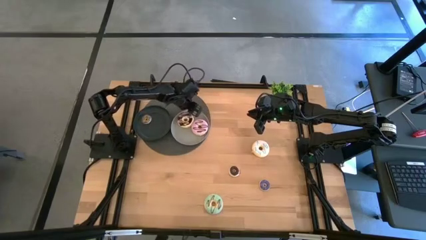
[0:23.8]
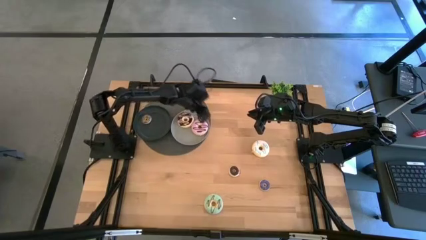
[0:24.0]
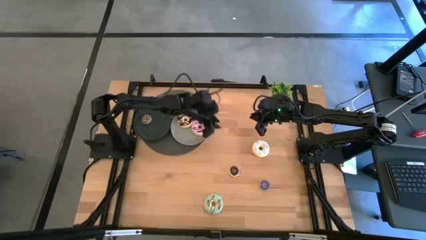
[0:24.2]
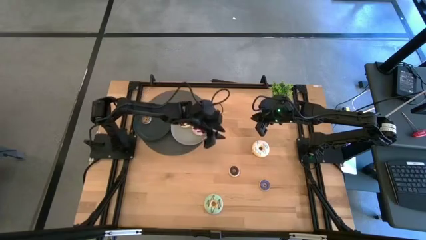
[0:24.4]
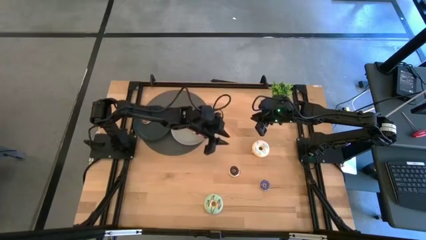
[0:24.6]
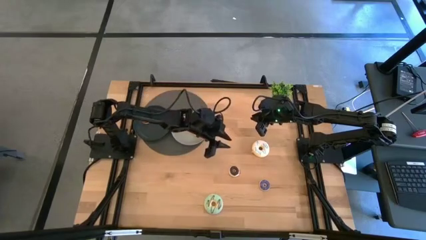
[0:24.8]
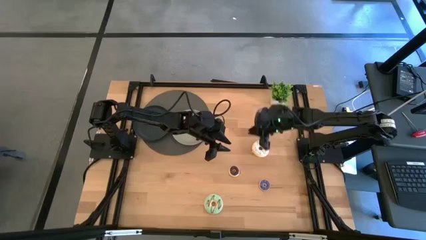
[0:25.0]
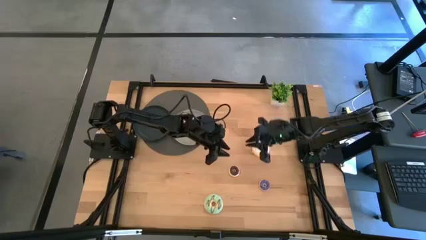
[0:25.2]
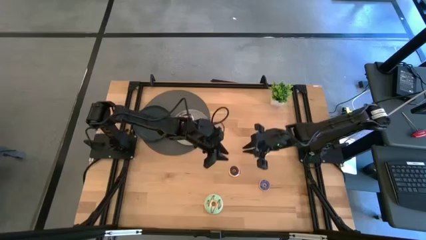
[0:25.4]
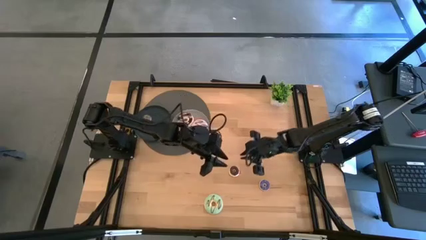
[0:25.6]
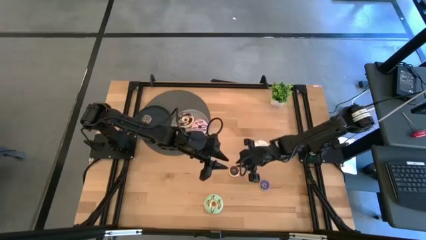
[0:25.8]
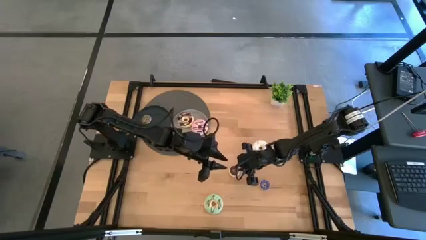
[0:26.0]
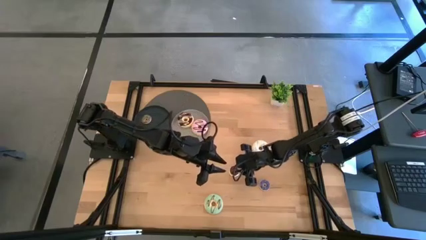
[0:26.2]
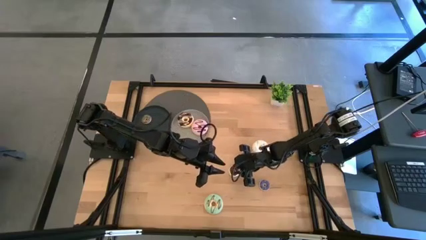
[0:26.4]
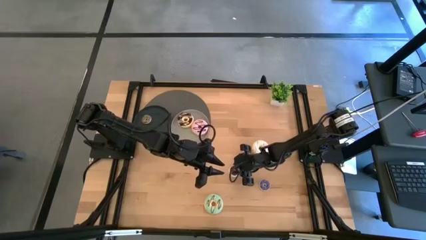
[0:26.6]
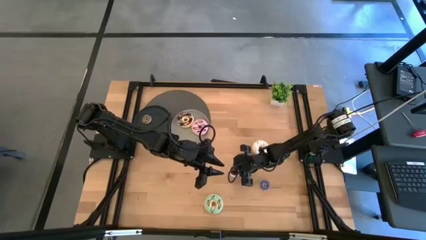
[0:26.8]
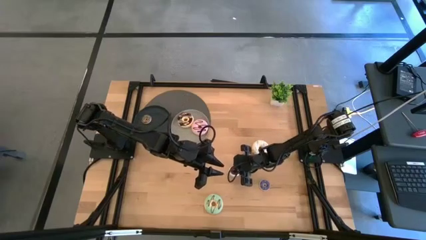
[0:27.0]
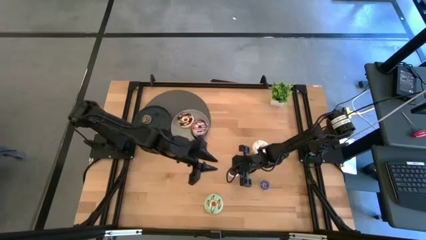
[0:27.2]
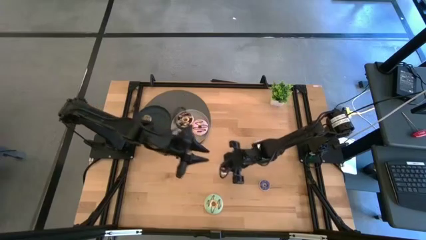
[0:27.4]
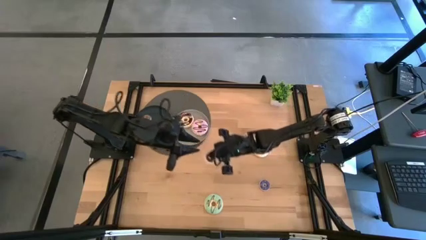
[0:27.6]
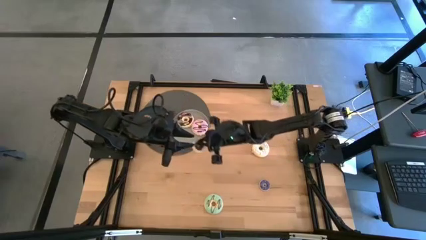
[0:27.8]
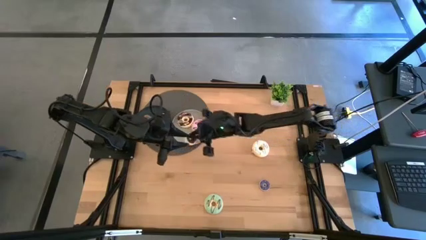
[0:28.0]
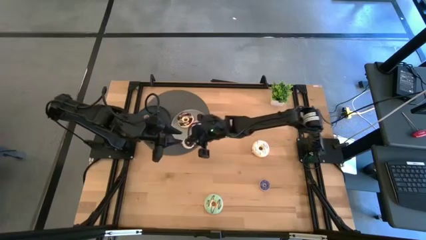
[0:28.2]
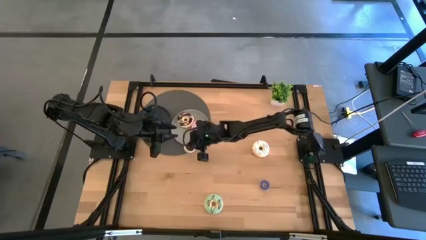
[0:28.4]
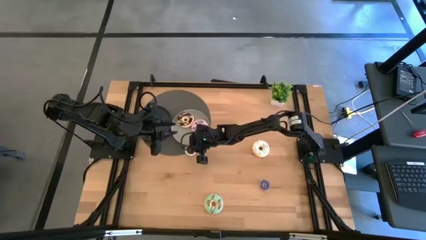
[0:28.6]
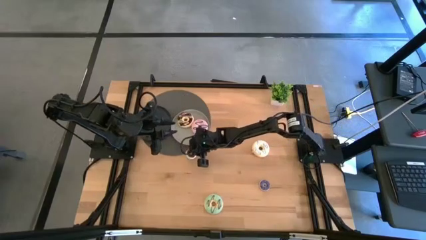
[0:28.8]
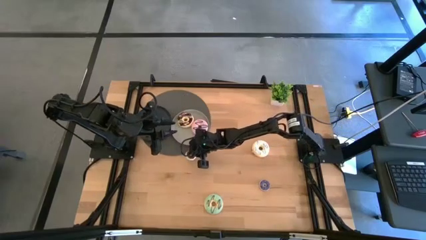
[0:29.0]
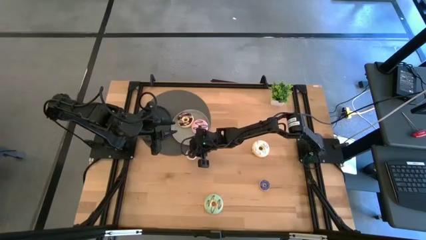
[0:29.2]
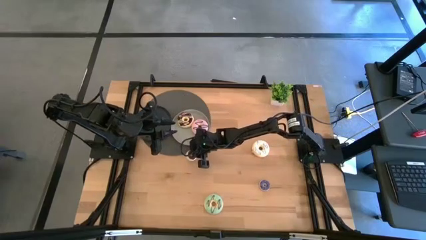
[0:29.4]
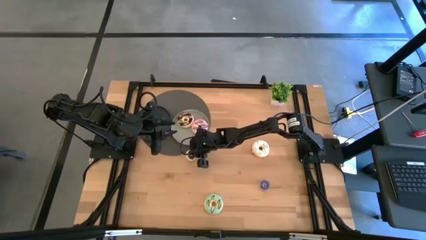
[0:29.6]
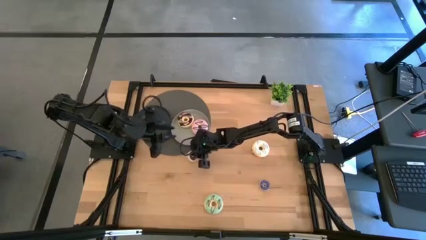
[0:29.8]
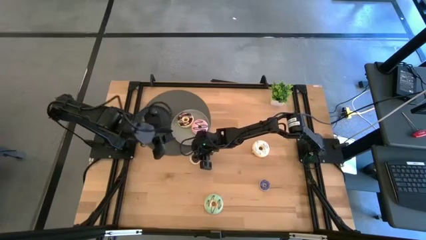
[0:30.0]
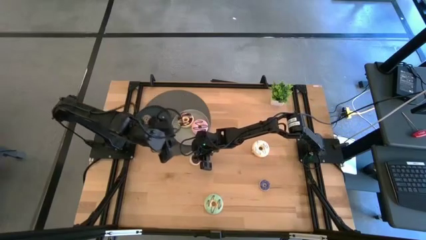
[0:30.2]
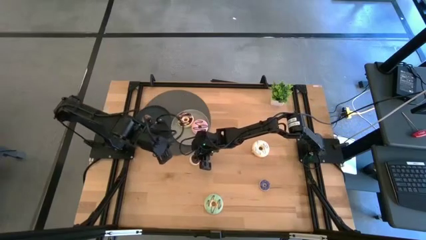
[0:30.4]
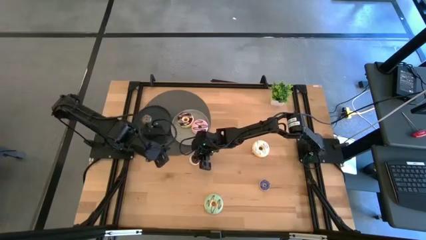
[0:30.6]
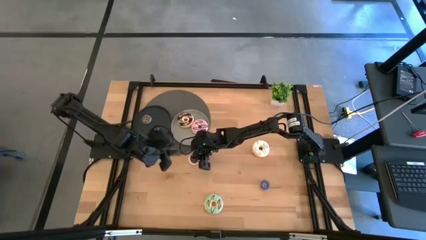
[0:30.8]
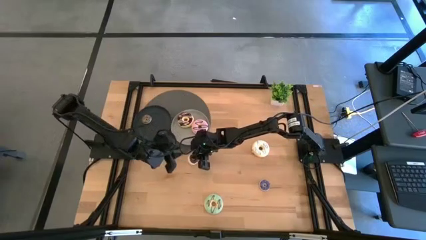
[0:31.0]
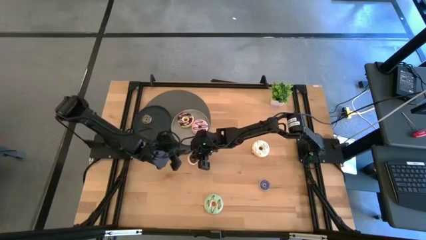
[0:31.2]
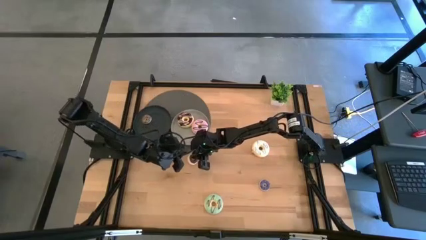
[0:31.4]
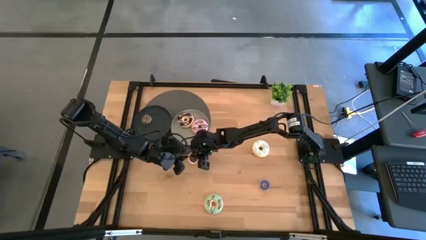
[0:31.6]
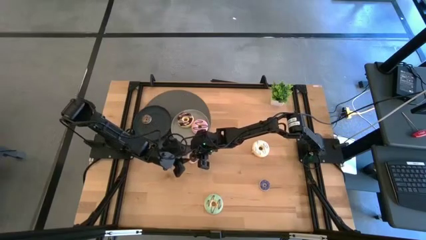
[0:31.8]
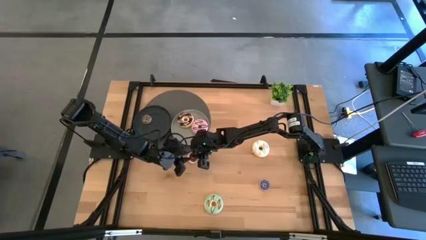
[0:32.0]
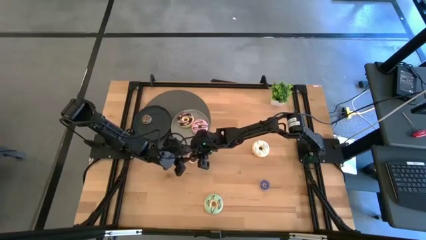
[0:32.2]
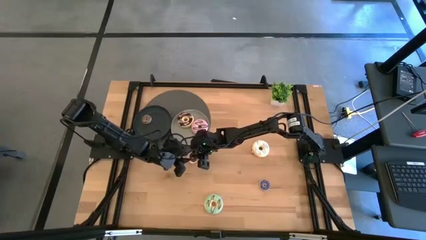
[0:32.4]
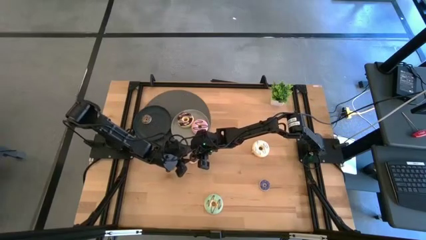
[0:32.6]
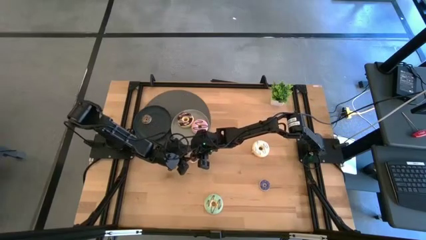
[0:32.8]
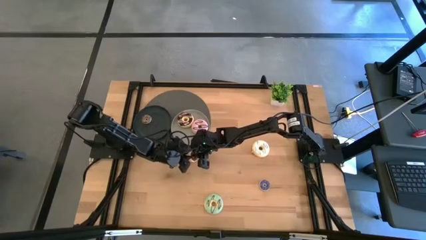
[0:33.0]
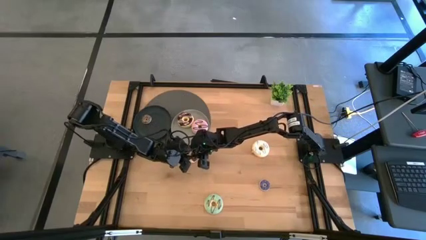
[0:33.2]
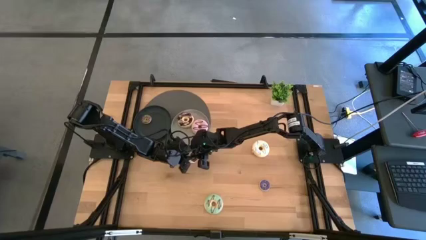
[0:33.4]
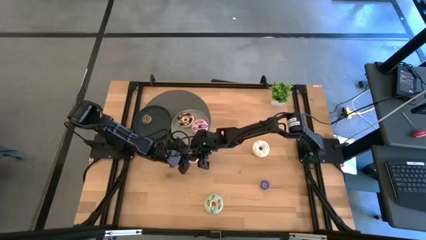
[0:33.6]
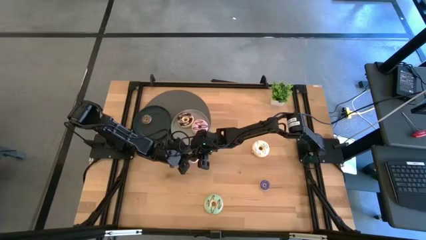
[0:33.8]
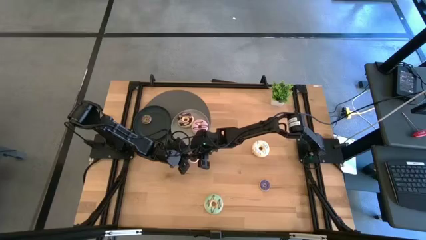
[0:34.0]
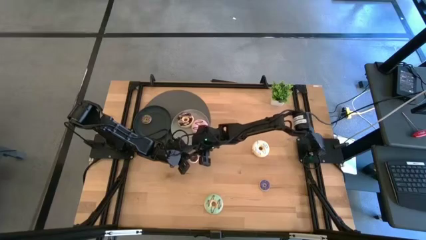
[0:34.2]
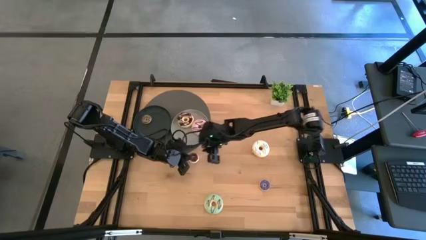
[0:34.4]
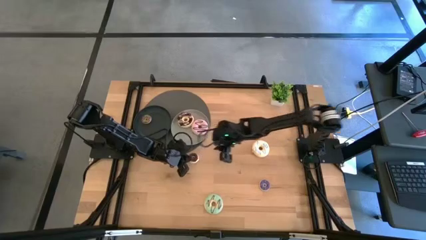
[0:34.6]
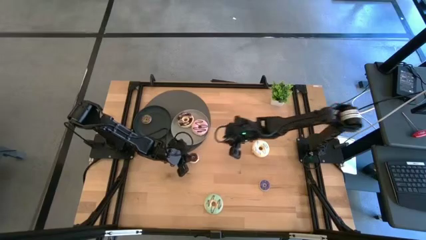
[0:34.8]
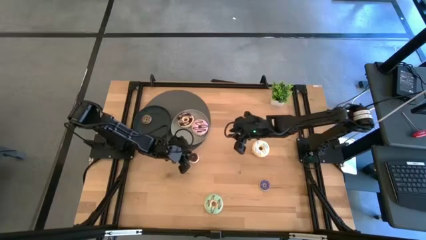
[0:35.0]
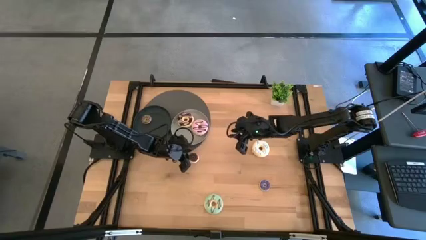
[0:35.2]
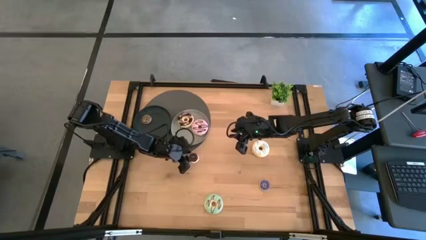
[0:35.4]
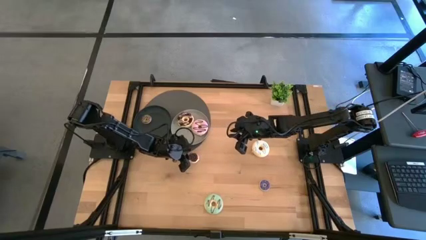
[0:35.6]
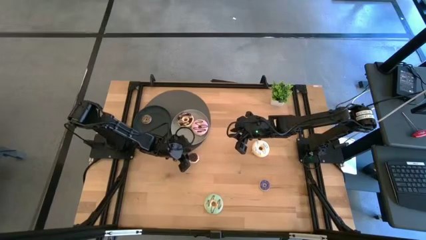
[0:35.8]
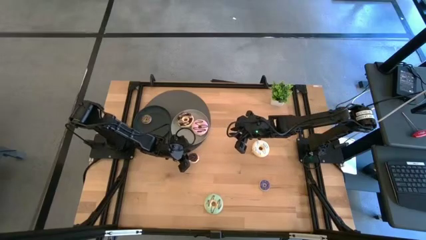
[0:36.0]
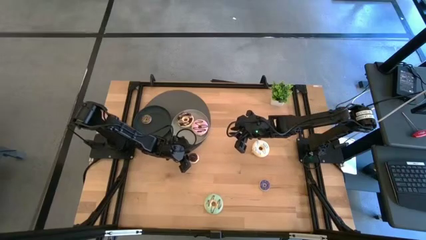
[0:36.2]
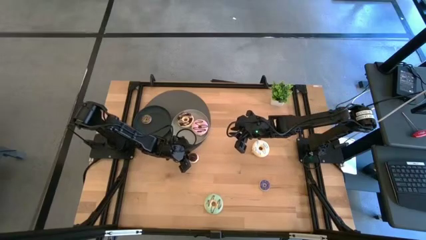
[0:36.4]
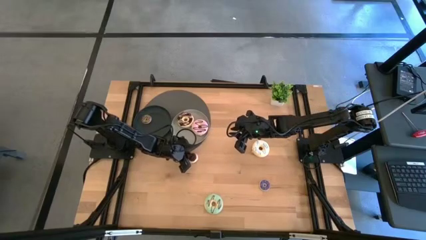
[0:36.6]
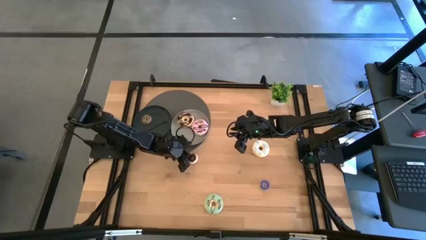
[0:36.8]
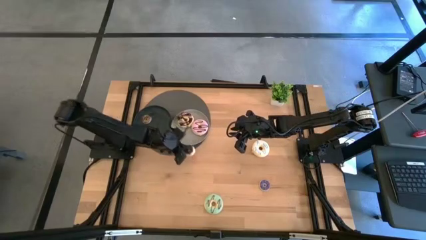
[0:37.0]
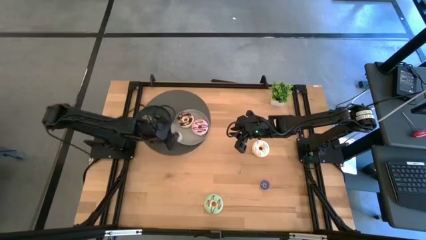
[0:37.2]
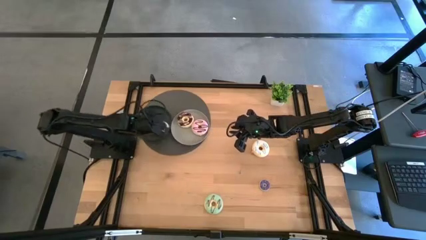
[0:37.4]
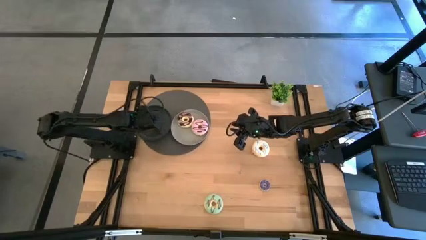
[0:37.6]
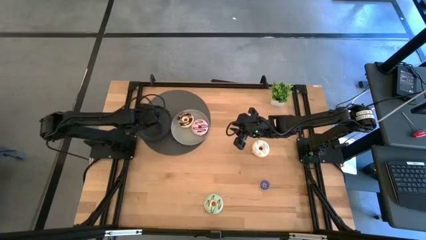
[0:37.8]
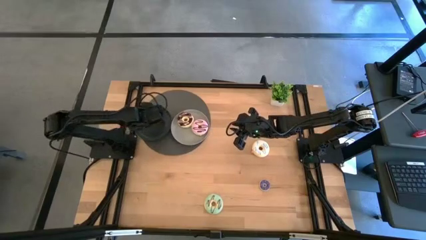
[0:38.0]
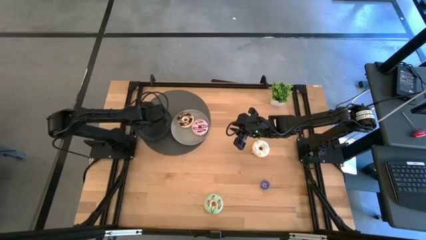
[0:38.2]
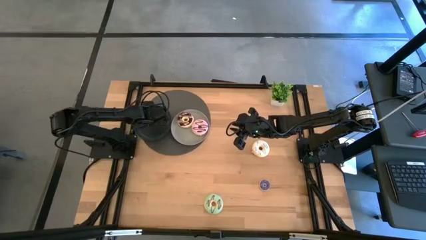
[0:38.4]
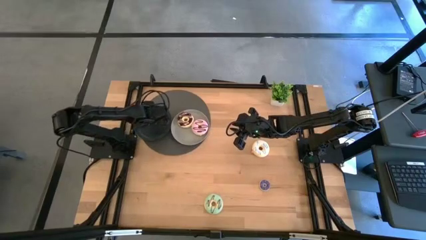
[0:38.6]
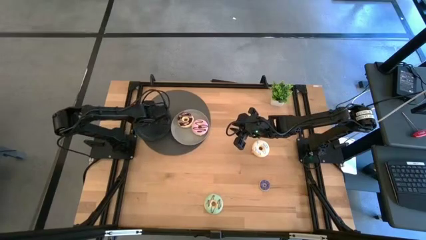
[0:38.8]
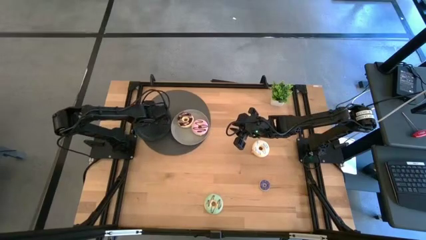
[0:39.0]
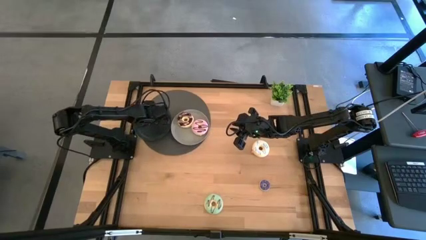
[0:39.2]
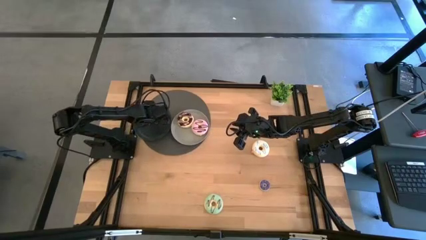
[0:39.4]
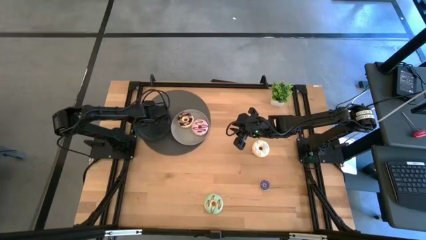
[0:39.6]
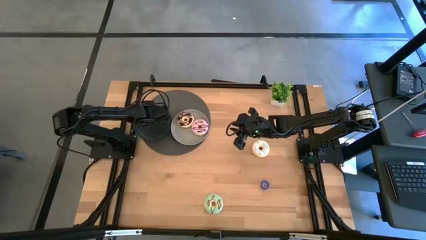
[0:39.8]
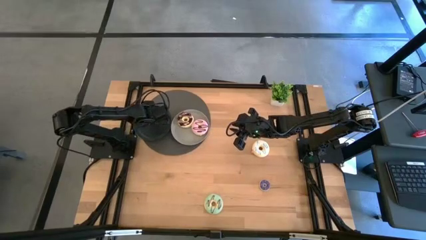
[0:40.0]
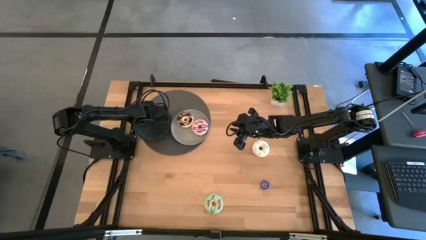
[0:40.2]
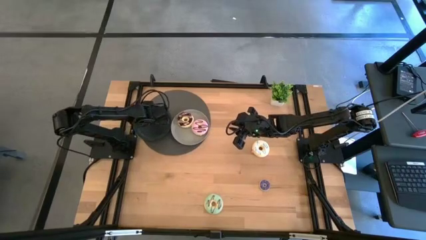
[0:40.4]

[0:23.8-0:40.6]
Task: Pick & Place donuts
Put the small dark brown donut on the black plate
